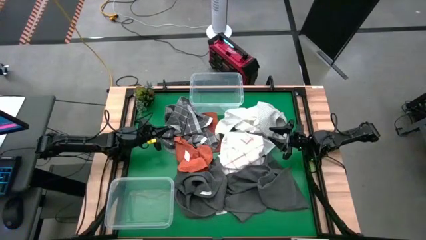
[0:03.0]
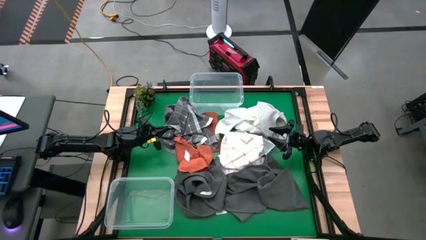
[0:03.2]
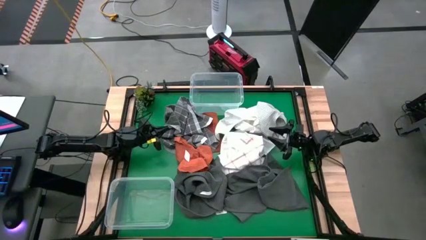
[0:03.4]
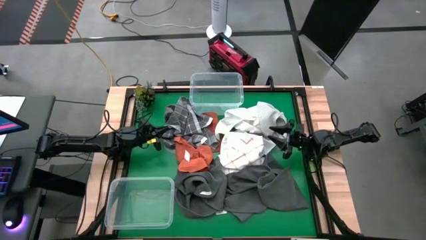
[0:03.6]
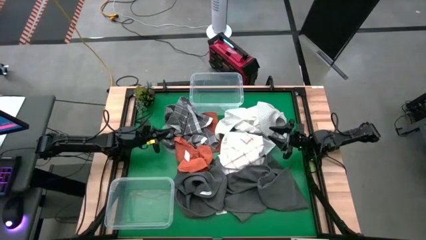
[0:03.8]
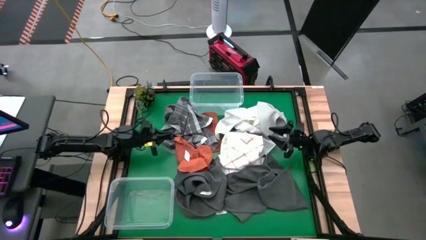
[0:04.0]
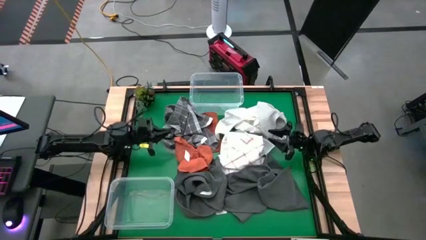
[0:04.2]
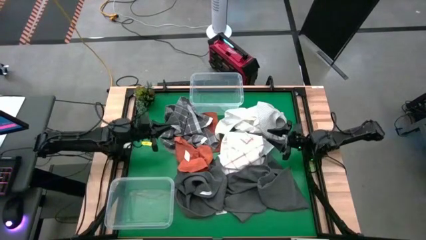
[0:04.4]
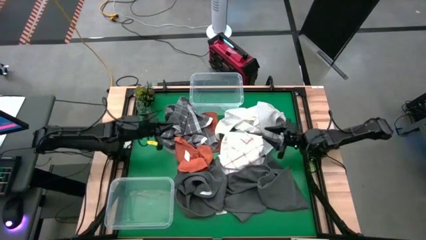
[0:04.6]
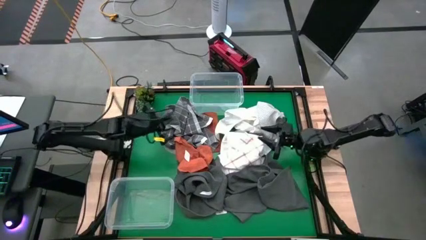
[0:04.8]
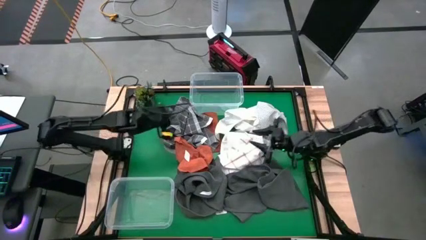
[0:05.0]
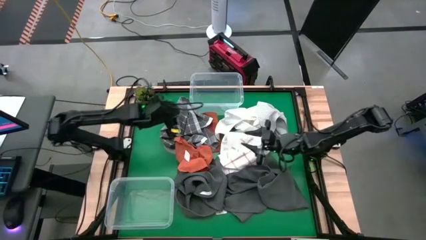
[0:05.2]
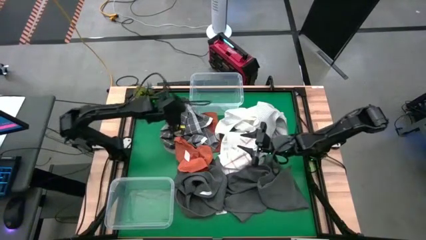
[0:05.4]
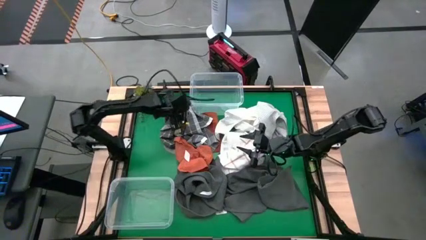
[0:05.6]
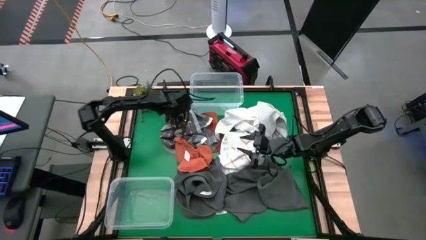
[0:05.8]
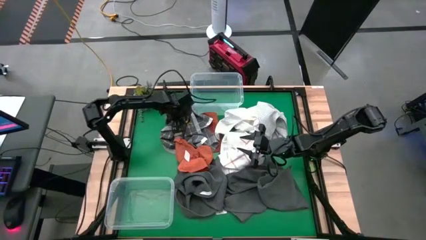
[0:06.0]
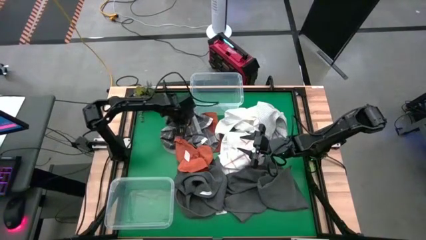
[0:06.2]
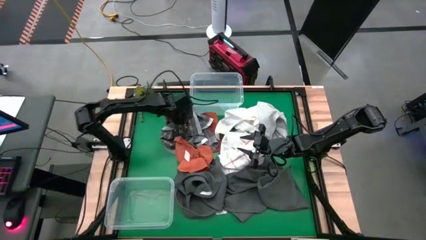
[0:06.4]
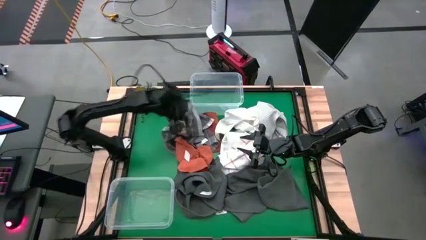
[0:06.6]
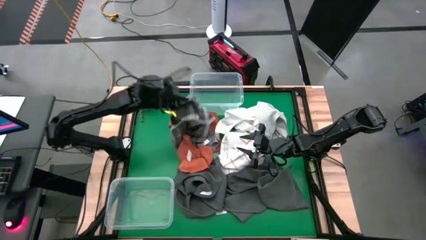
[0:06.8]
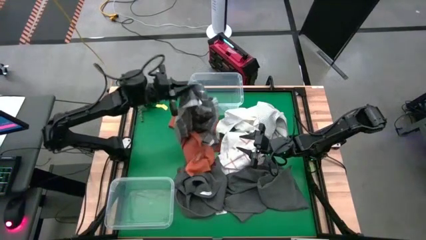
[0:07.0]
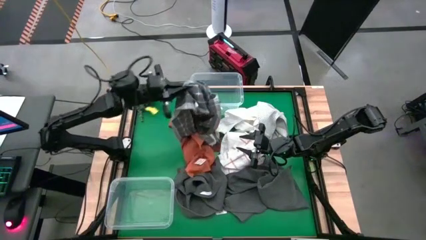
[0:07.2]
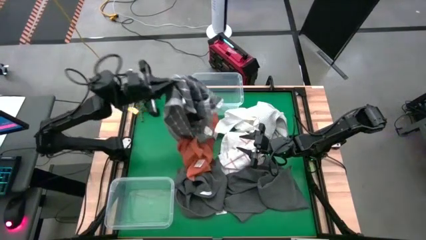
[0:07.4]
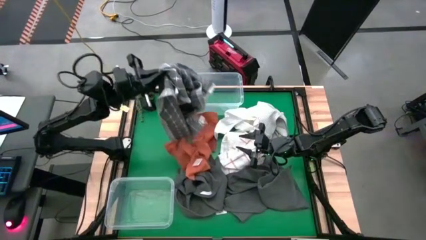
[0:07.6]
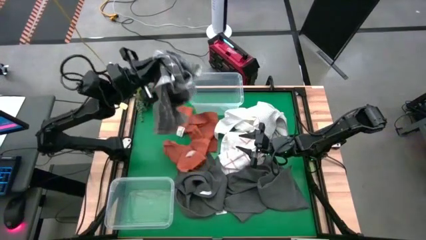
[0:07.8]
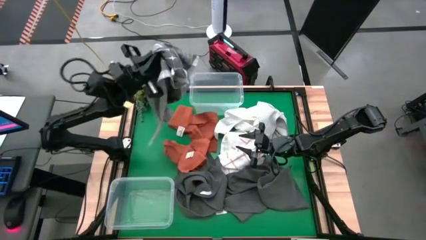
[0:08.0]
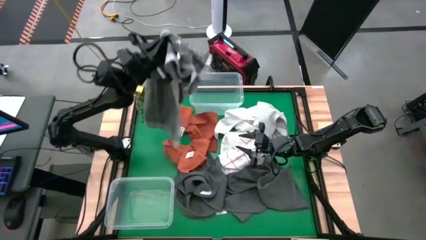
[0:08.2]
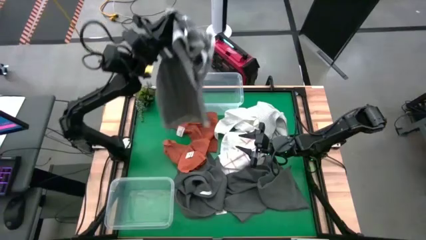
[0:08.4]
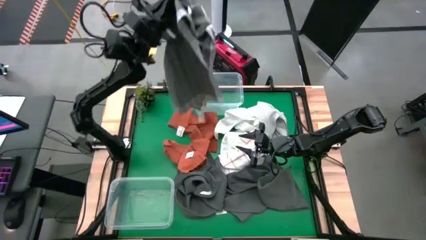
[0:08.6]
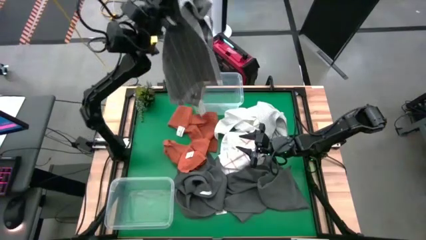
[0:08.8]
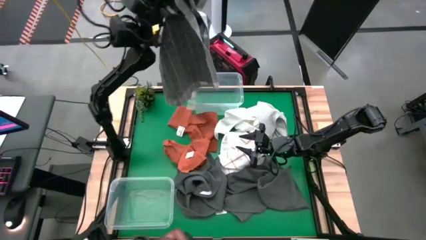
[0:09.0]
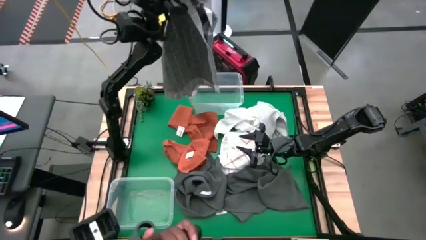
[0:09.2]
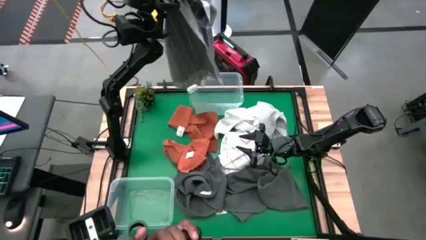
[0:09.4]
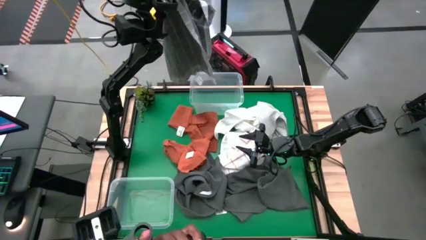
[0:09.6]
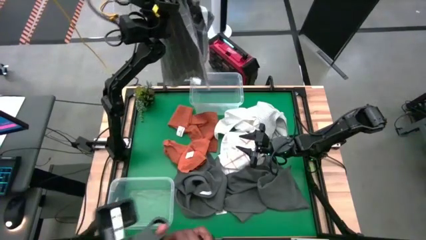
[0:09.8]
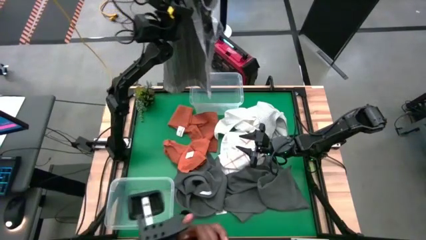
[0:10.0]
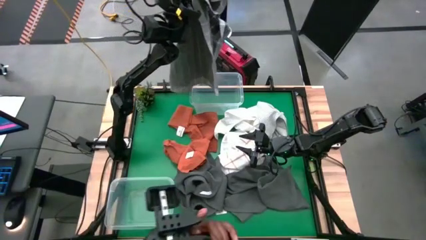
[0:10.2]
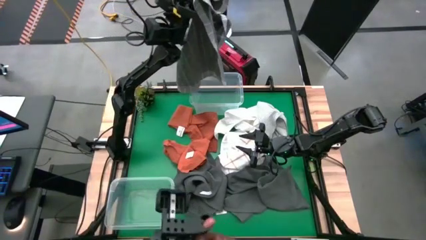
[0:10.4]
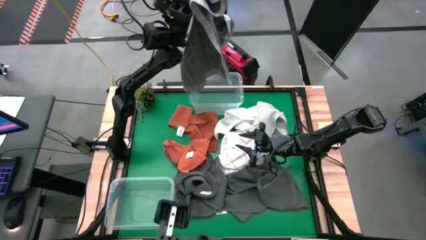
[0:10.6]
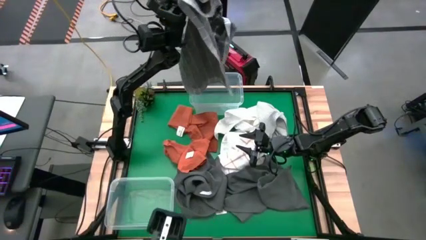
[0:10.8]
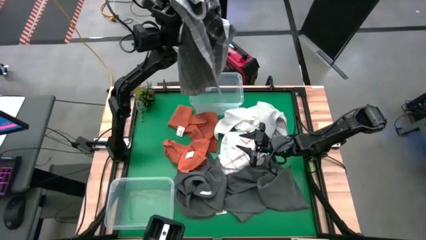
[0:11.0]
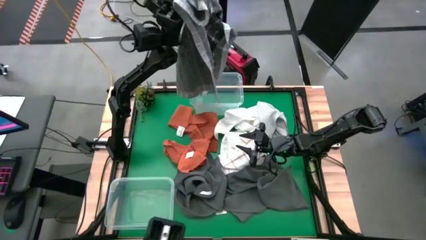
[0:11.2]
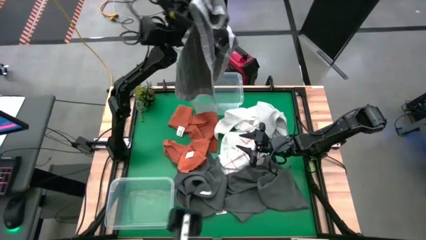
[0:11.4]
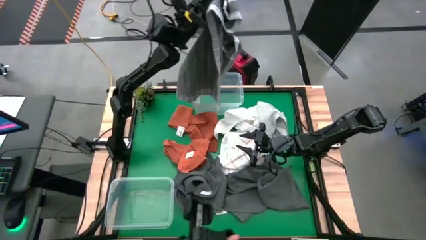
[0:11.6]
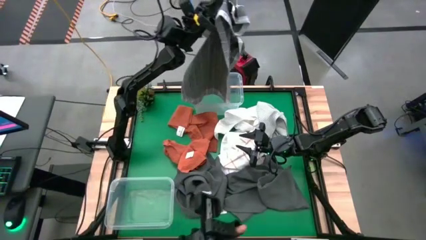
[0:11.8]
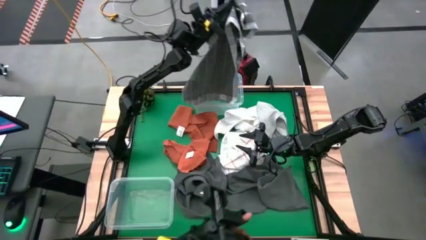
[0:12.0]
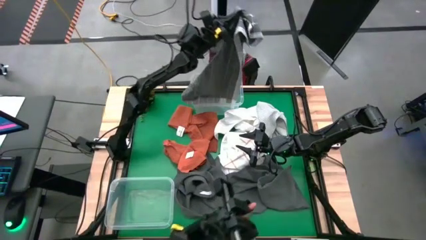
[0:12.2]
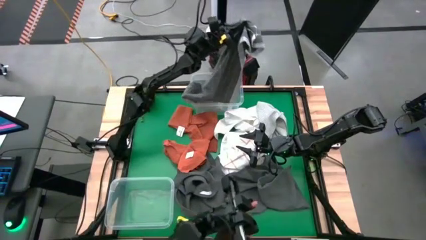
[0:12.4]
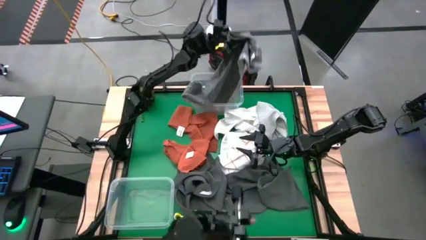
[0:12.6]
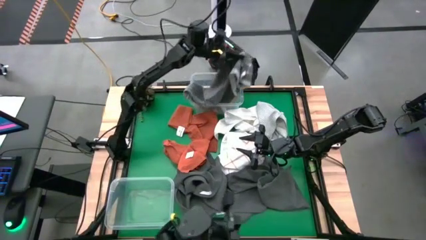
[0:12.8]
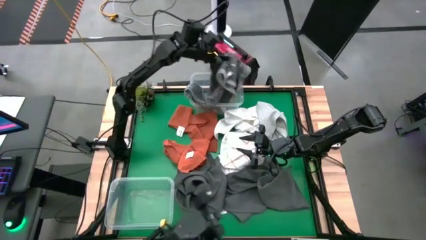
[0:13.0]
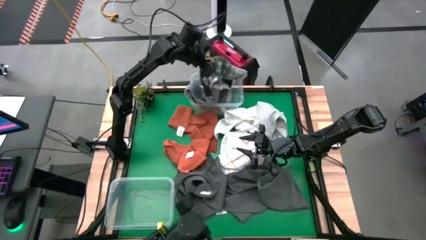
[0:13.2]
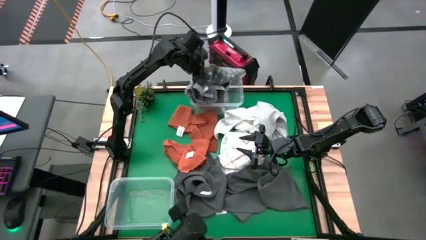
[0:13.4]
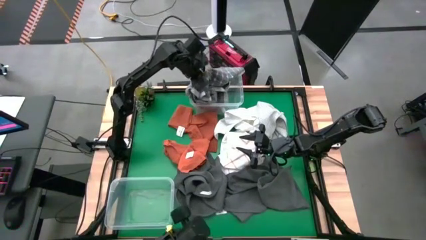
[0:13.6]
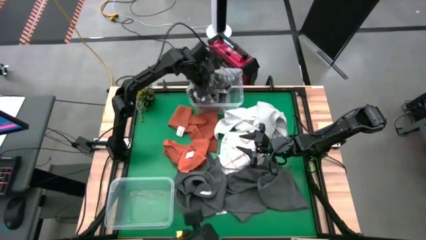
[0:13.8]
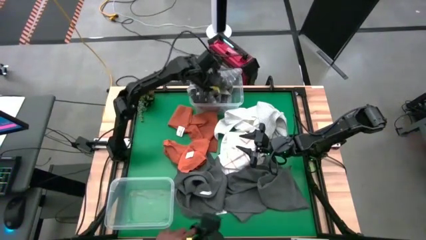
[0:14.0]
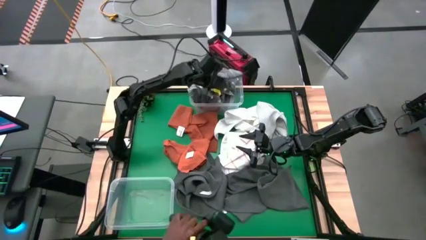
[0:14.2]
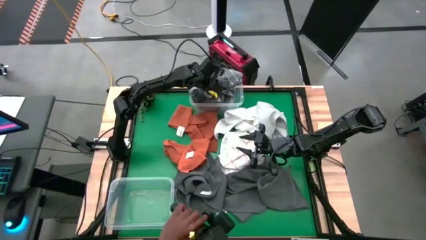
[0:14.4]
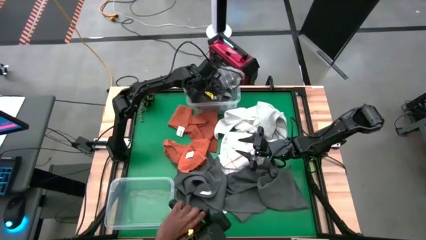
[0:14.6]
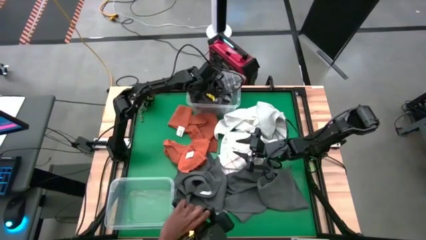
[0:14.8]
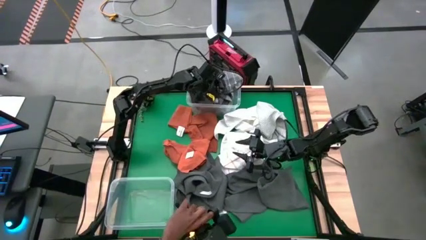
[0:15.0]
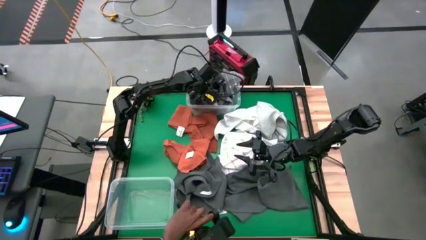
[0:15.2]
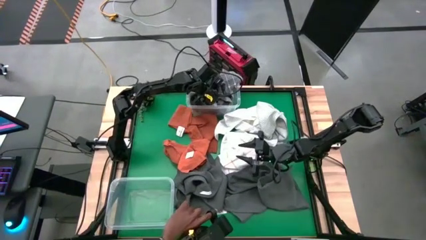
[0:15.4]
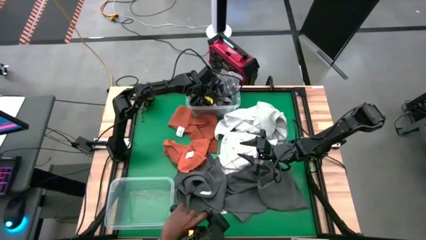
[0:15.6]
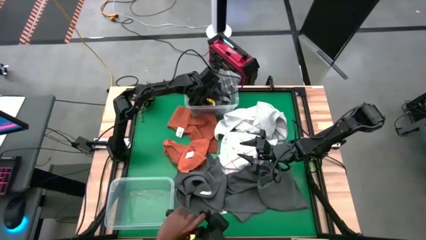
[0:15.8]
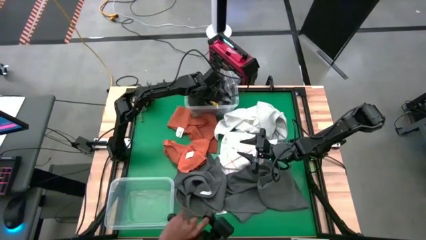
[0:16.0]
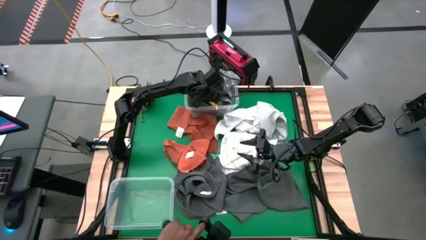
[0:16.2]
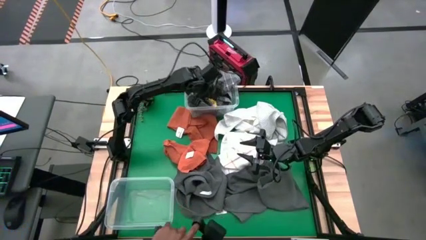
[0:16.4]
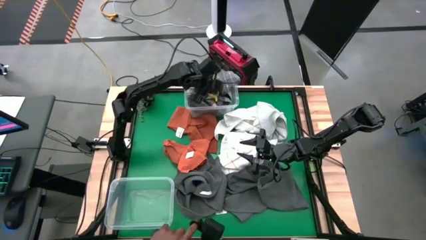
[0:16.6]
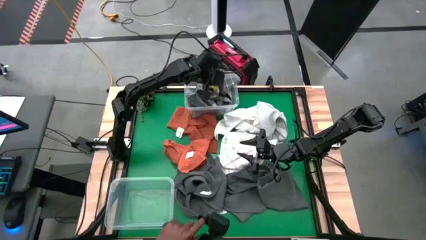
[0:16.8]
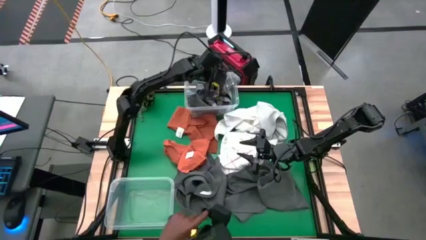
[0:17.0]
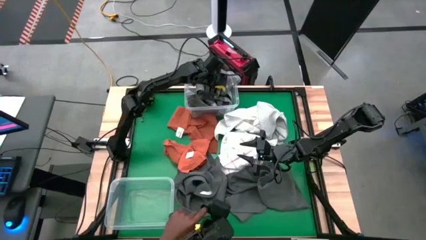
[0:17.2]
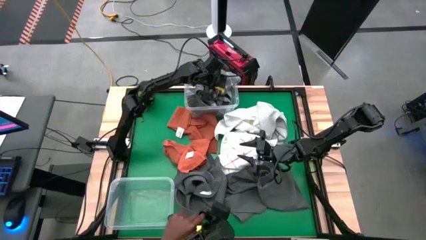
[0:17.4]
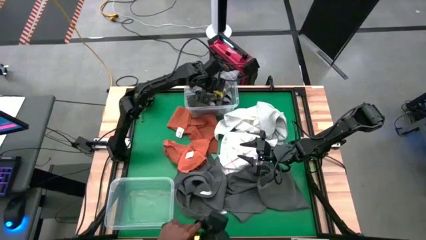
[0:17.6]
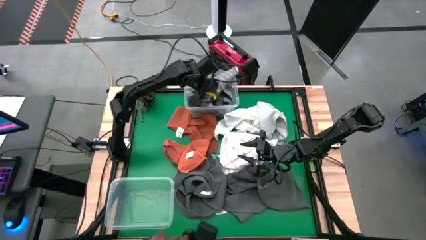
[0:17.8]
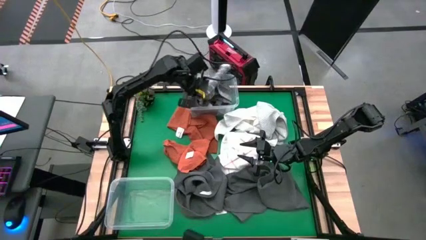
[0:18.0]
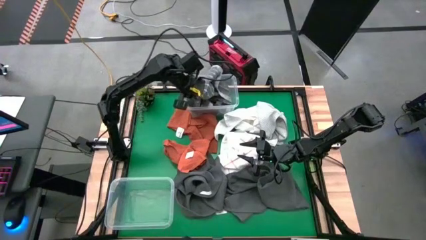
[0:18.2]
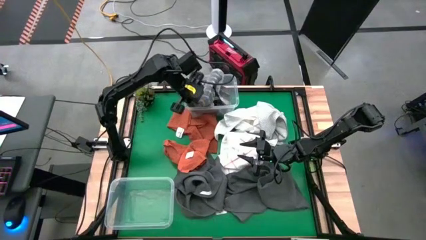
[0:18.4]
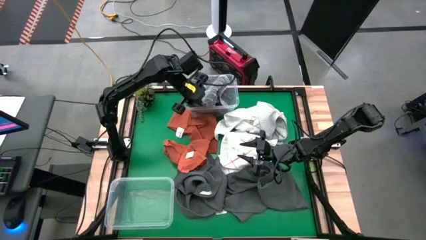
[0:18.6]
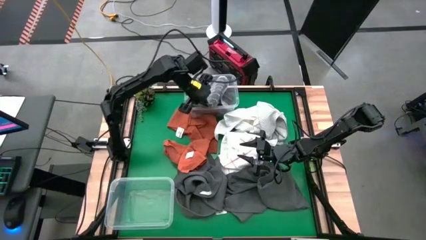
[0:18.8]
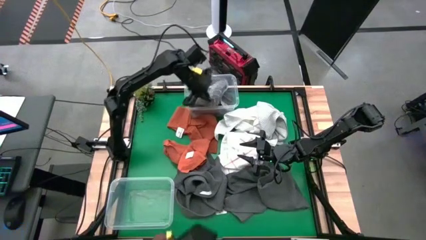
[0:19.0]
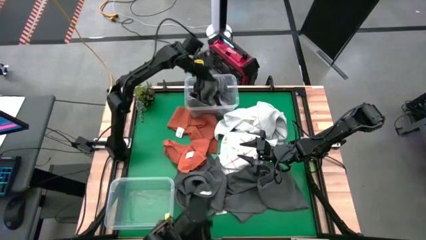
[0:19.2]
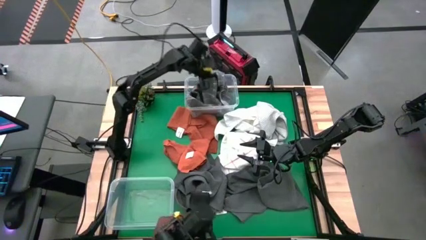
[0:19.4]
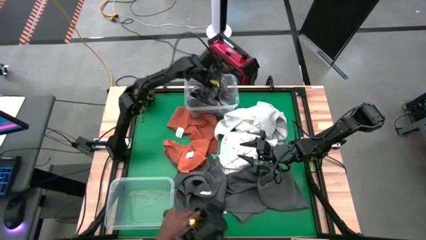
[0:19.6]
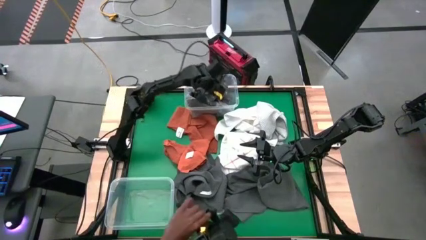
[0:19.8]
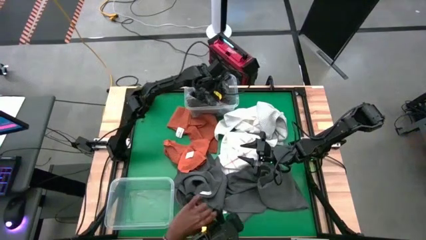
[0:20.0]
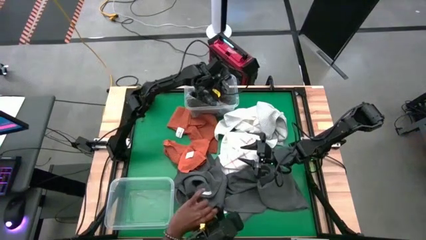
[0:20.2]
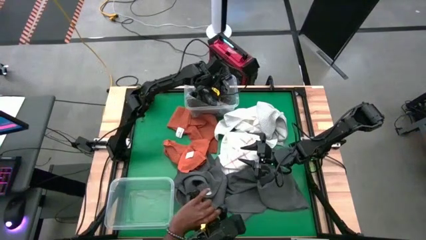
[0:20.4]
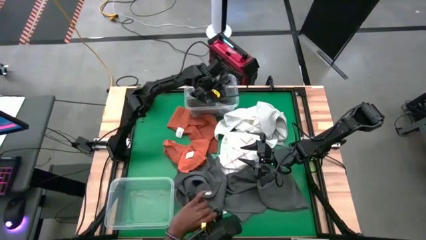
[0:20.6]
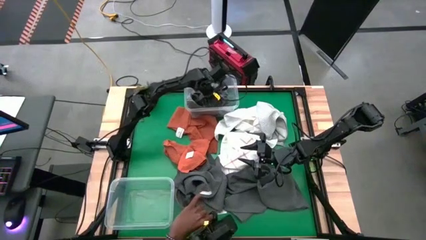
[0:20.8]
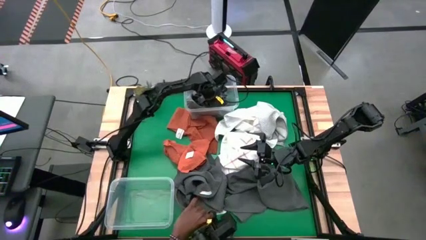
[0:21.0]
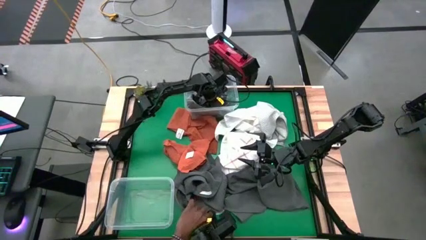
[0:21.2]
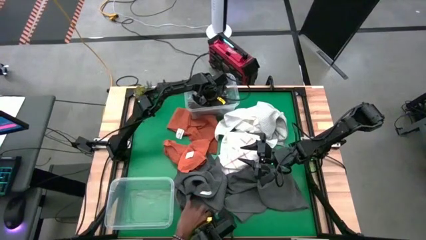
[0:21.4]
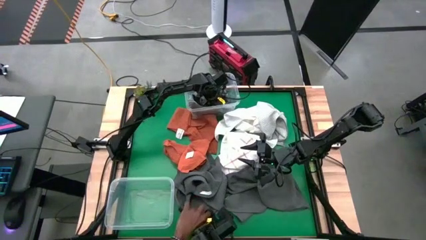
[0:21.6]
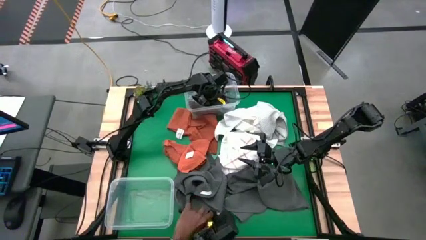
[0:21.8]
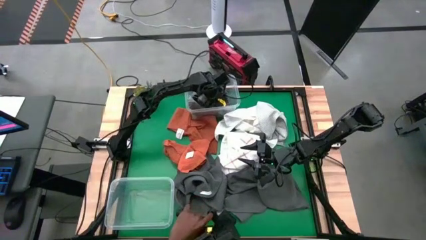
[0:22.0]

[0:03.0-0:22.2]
Task: Sort towels by color in basket
Put the gray patterned towel into the top transparent bin
